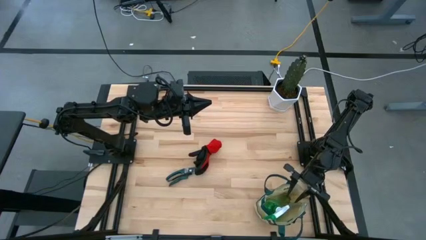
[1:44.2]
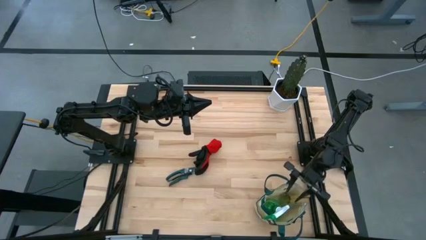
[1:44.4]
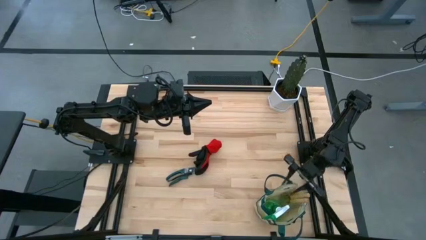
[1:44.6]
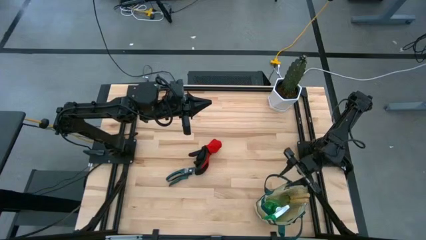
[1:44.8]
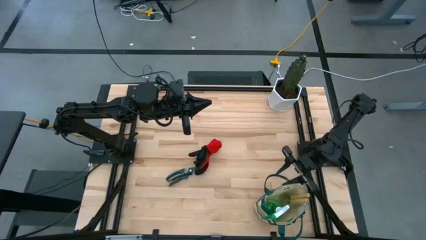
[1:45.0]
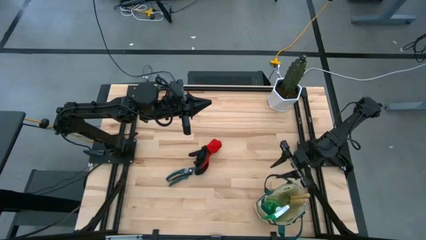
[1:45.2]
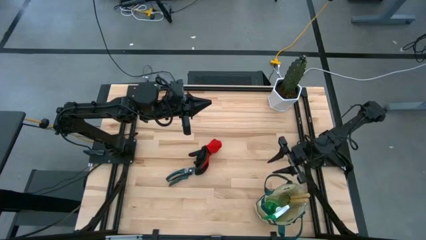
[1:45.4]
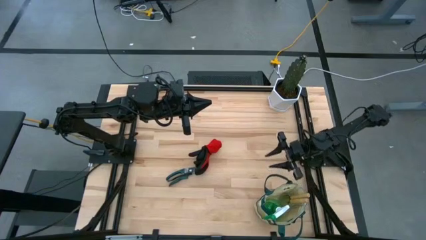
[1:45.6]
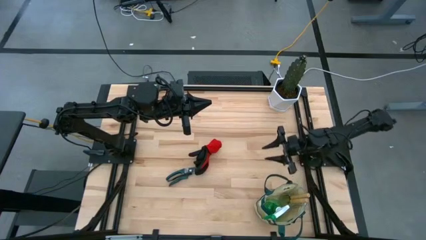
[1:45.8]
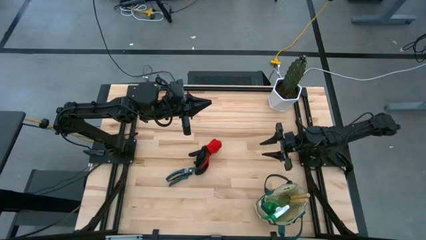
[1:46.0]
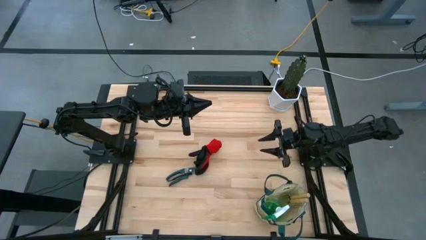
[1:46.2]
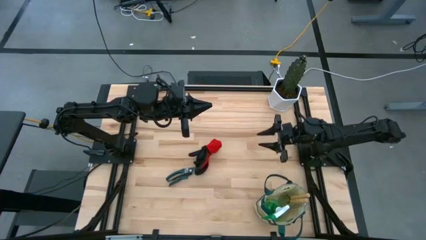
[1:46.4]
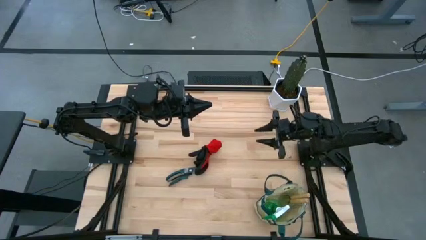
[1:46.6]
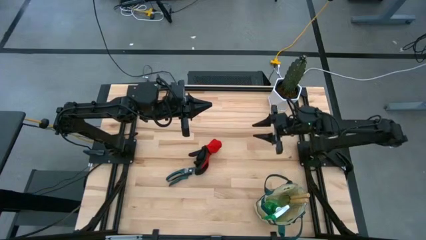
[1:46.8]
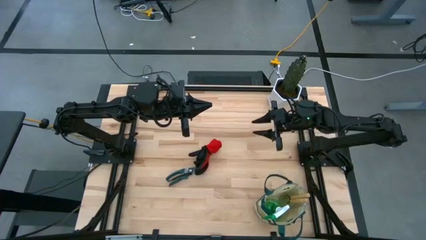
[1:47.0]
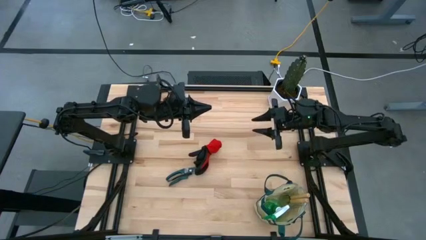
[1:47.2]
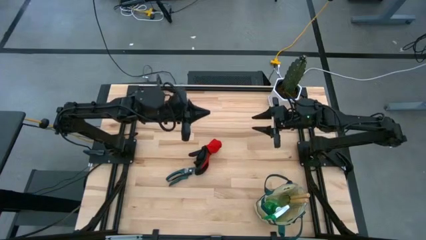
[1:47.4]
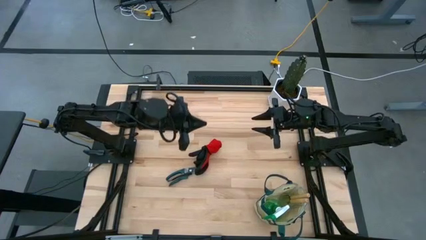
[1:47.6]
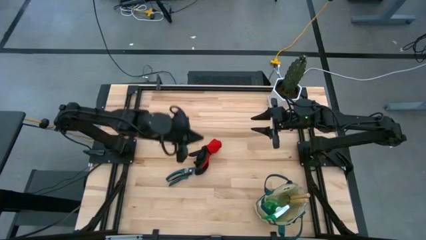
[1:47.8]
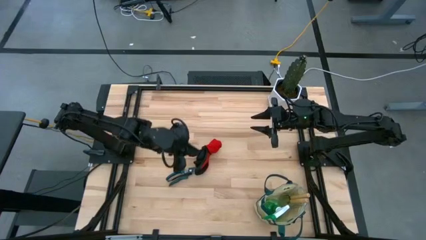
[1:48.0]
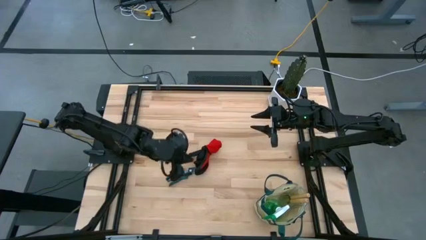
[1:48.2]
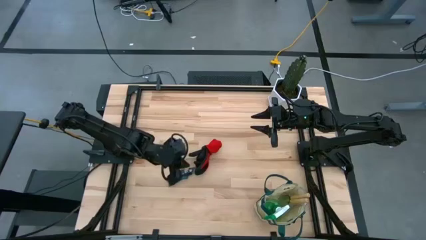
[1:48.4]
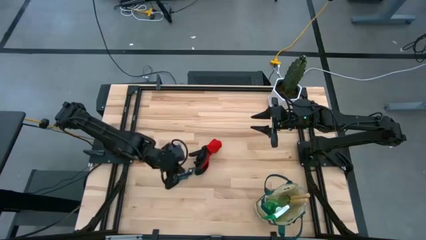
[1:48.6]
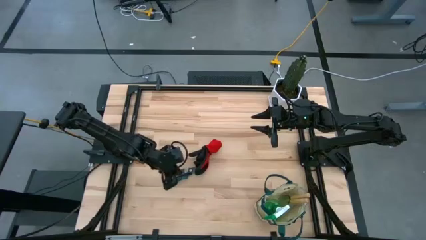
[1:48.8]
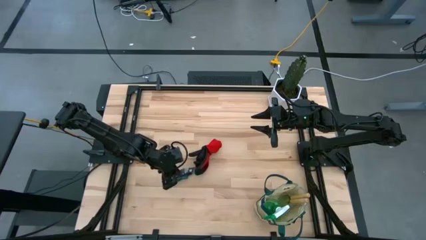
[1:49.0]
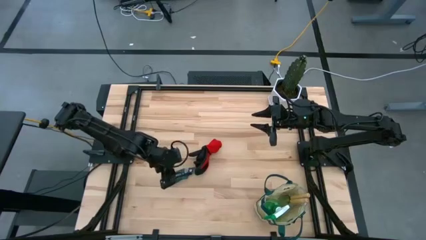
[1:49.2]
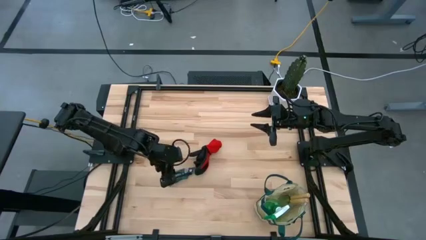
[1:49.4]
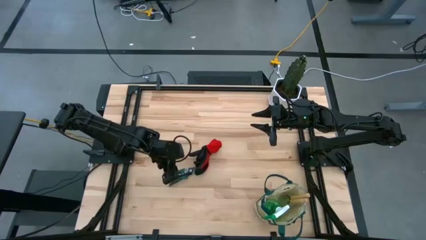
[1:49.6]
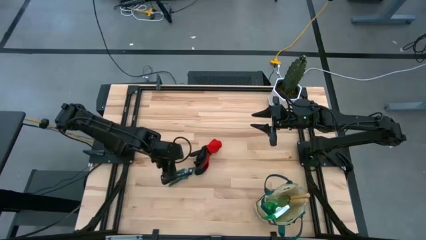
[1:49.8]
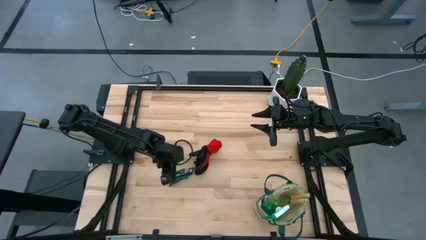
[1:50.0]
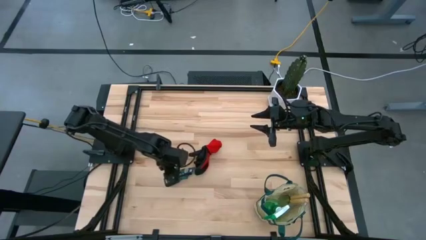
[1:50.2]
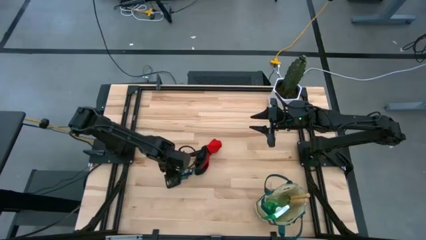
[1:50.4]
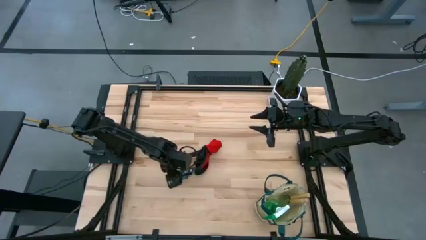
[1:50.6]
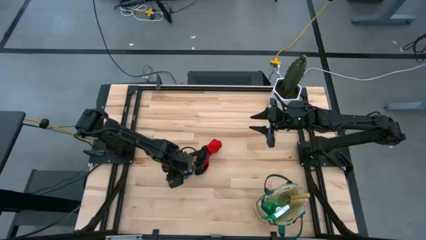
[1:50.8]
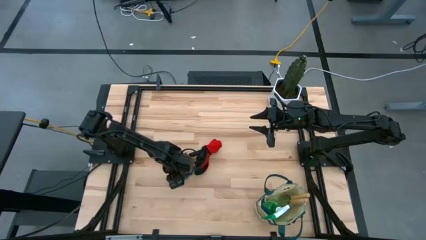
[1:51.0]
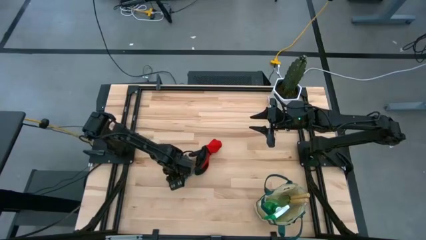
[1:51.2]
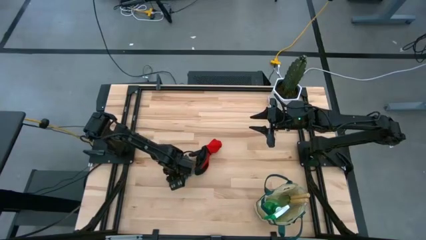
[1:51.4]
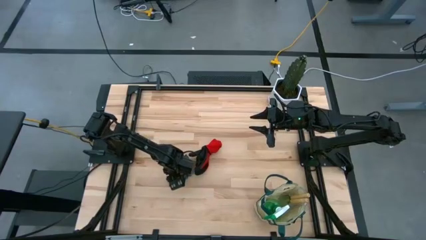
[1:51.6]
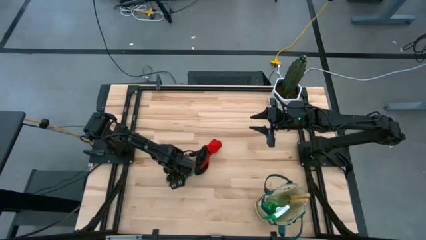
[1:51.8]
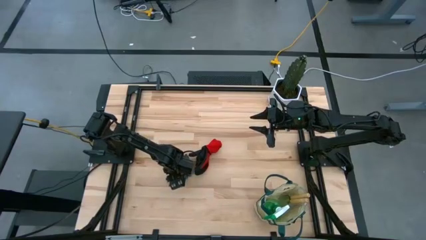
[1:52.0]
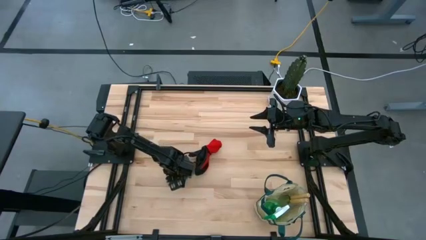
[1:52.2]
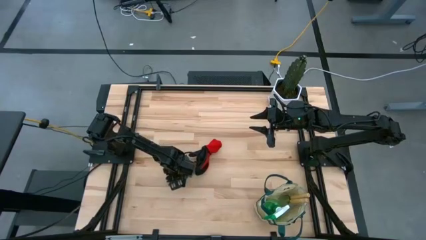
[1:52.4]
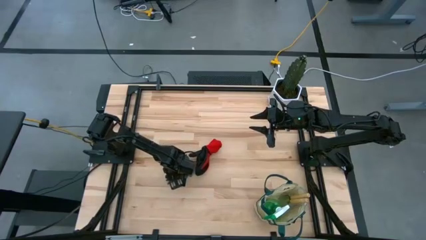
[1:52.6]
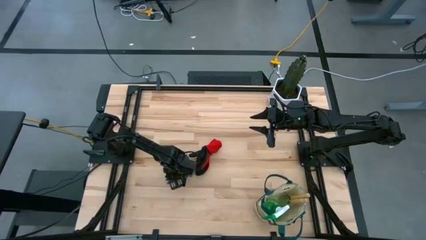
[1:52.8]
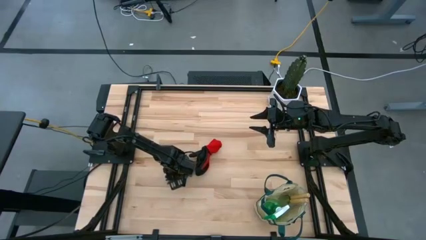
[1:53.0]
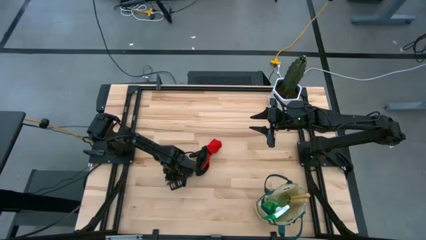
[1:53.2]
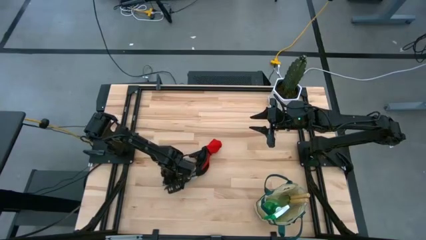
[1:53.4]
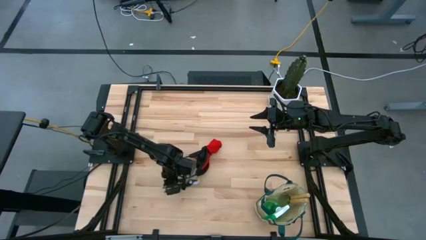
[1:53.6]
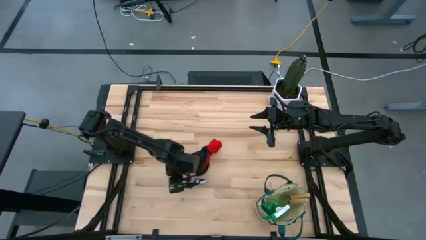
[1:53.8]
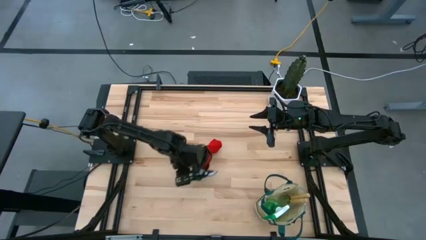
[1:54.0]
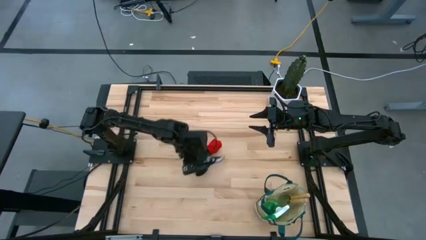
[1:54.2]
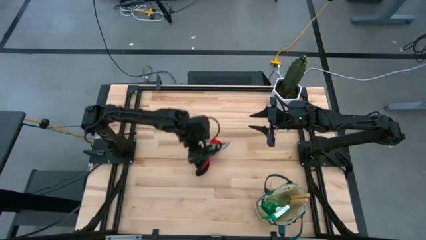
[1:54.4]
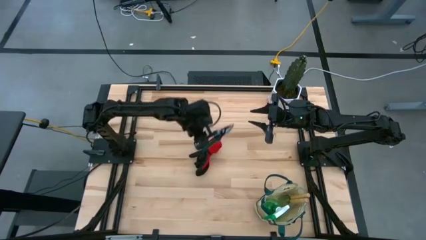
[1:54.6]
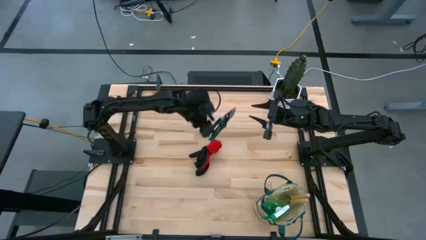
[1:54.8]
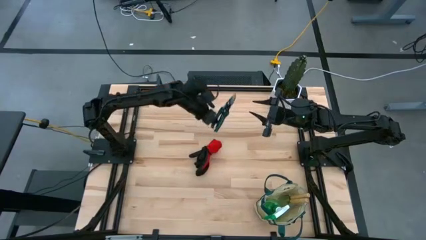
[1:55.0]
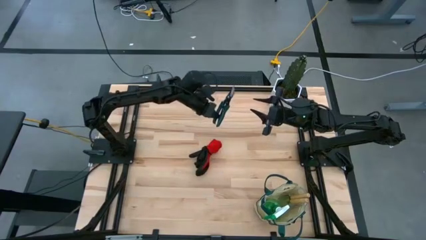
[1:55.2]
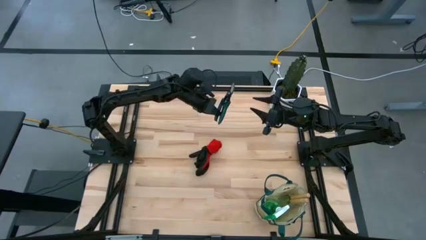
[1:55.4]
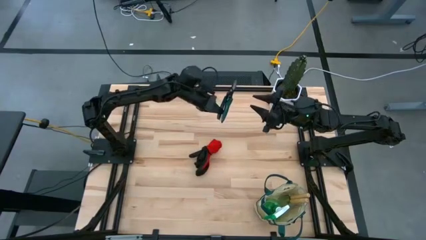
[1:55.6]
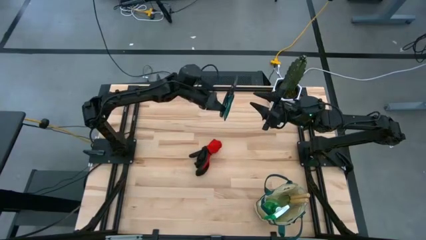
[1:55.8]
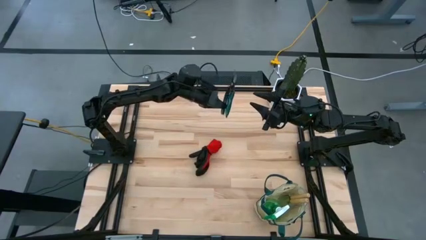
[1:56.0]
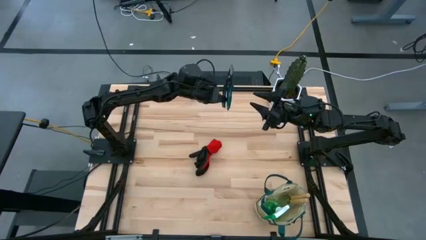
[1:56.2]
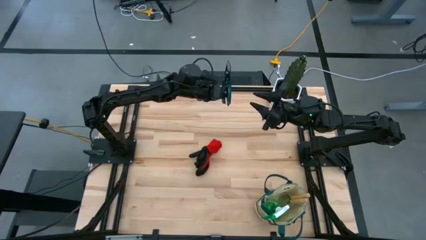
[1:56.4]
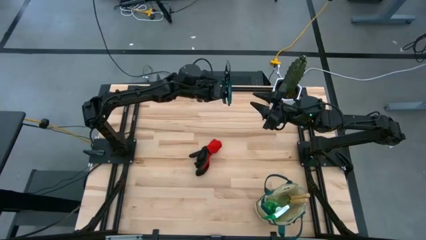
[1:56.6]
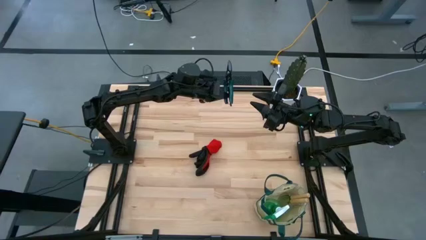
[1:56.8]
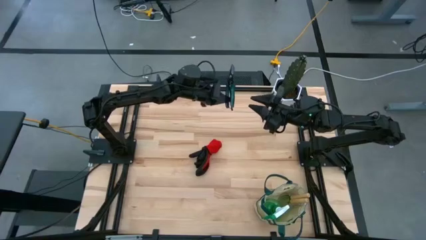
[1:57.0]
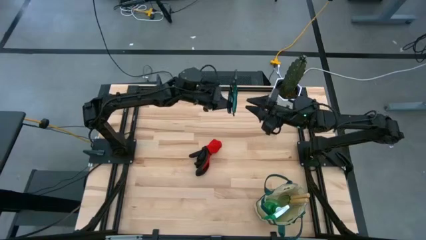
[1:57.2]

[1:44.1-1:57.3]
Task: Pick & Place Garden tools in Gardening bag
Put the green shear scissors into the gardening tool bag

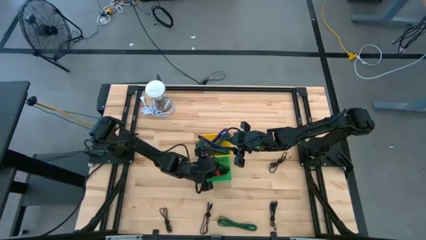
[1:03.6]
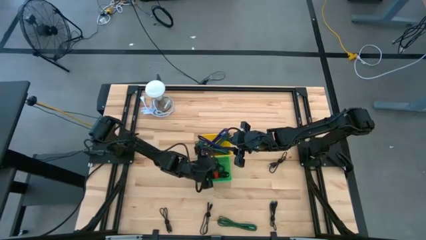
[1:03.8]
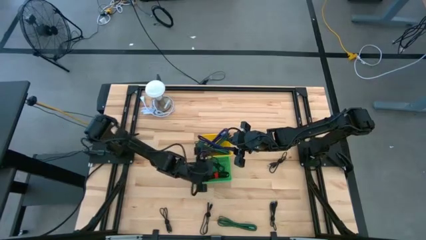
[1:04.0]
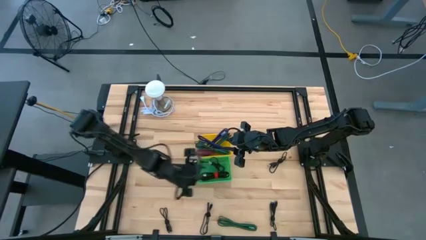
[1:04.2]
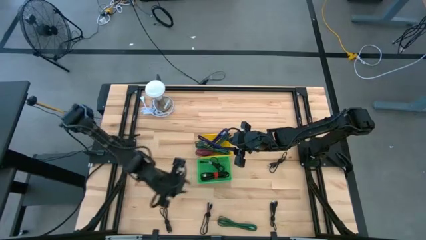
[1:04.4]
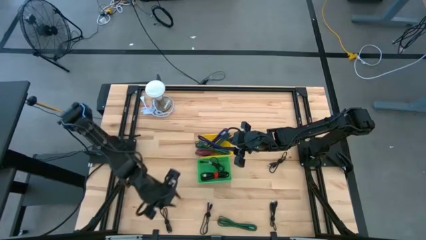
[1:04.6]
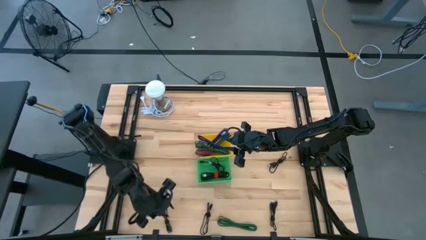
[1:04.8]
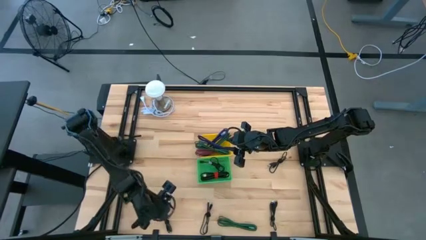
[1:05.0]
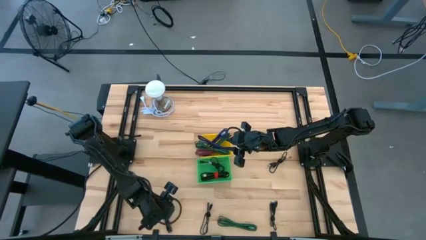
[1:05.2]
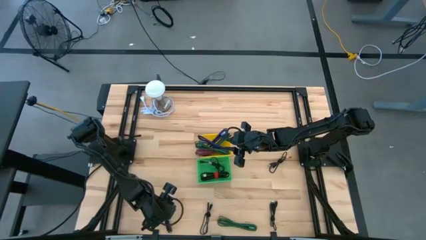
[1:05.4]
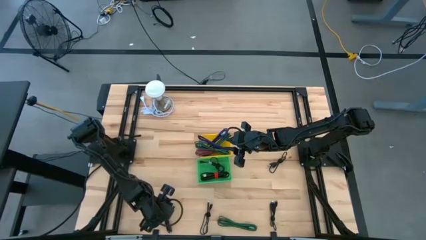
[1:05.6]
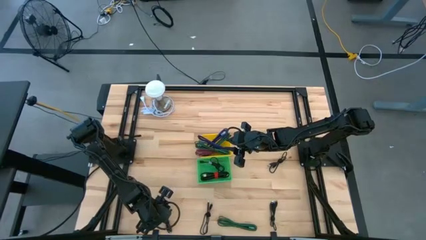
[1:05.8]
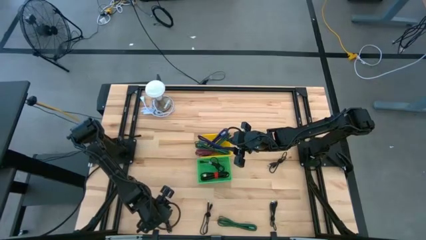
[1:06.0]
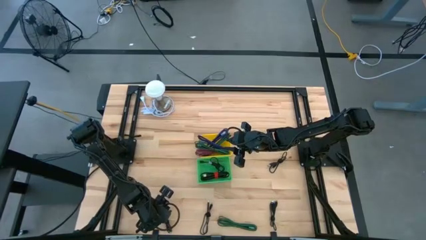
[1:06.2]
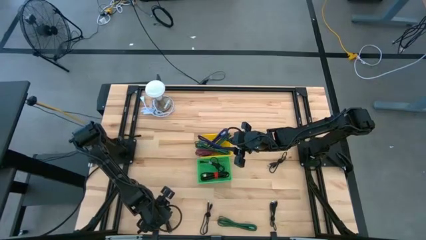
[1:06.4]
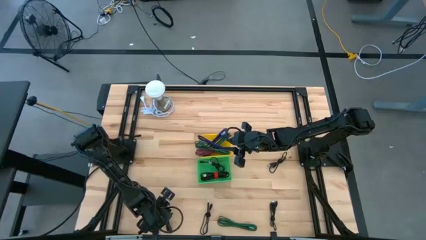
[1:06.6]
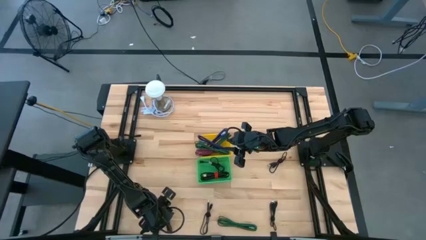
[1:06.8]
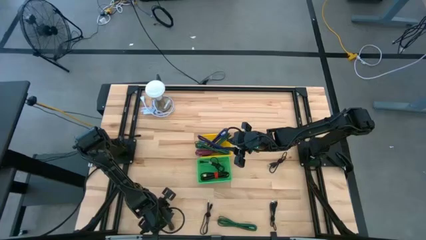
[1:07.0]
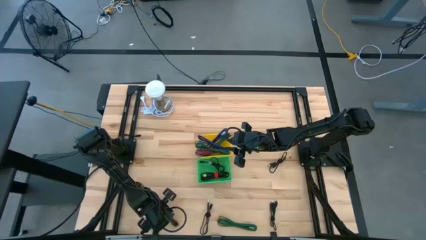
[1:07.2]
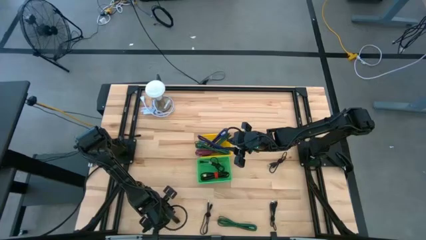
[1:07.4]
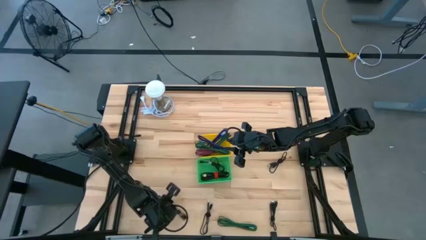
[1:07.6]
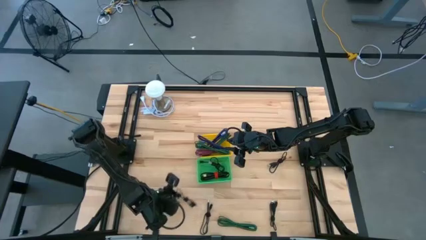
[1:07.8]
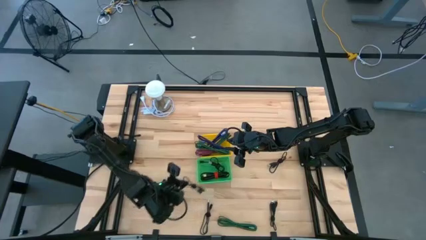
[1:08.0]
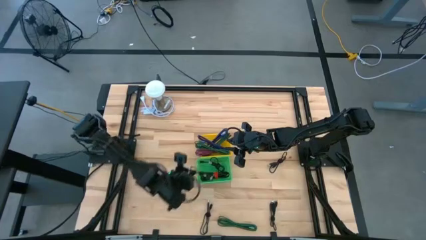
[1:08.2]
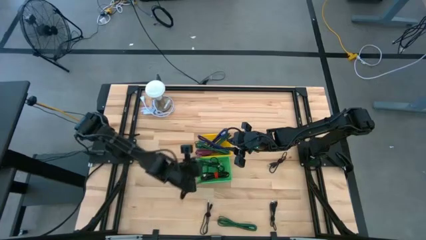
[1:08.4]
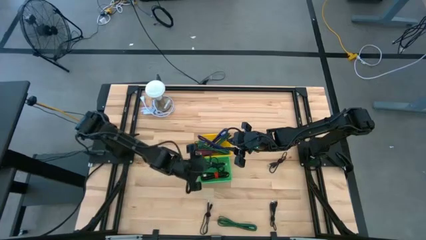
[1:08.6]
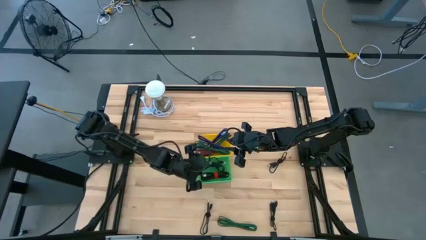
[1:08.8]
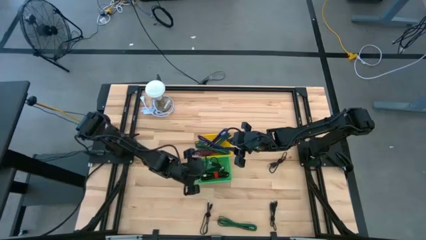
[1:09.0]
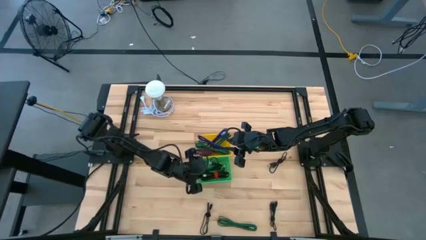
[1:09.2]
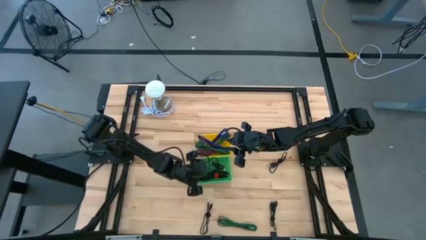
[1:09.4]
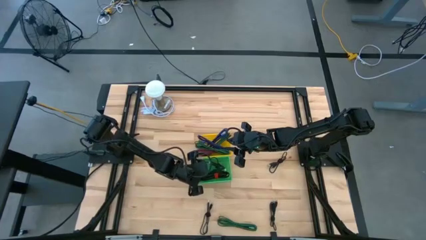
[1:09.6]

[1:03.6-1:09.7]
Task: Pick & Place USB Port
Put the black USB cable into the green bin
